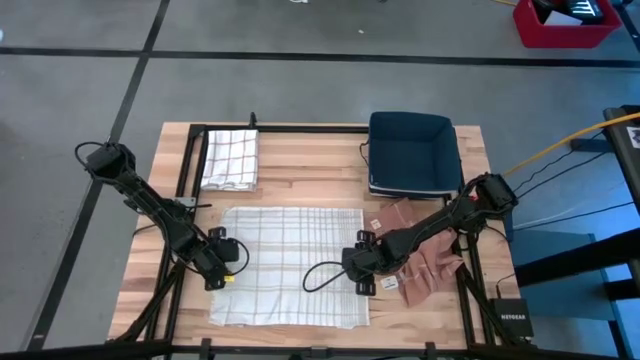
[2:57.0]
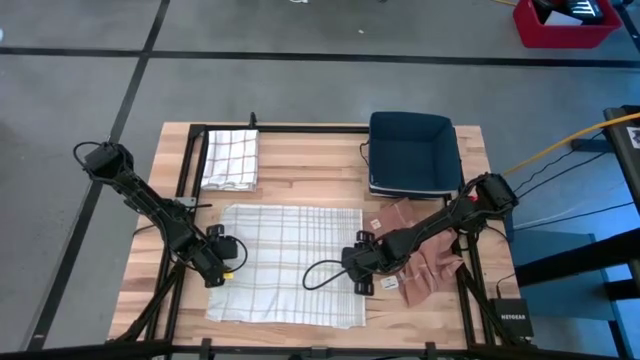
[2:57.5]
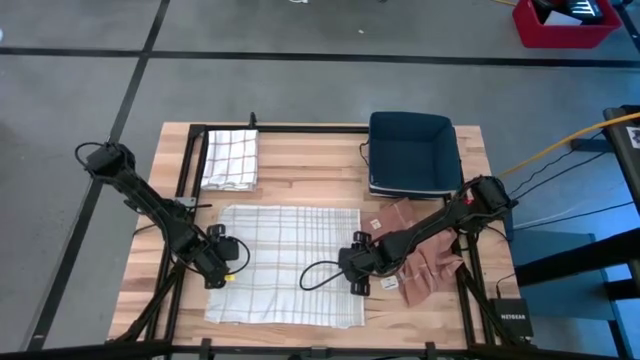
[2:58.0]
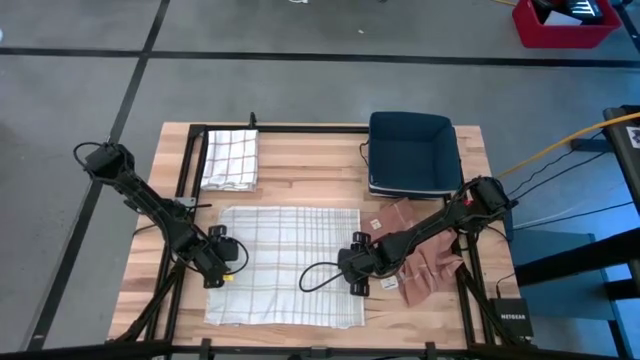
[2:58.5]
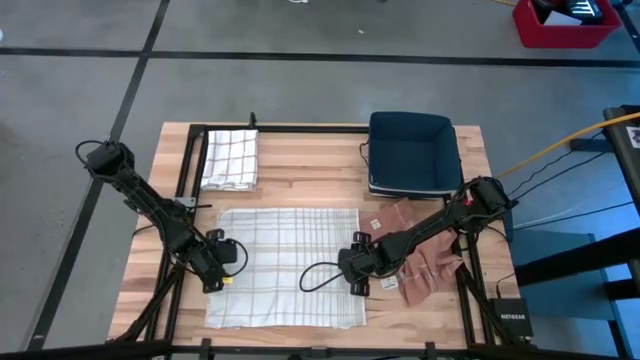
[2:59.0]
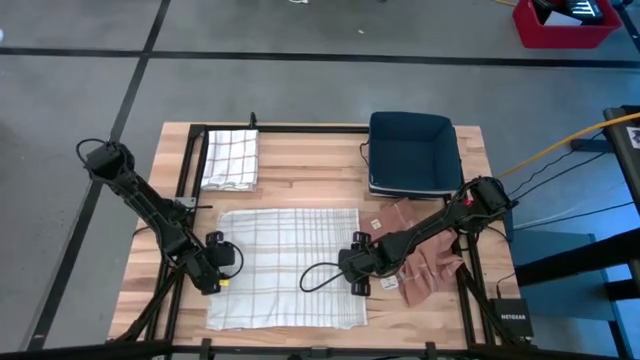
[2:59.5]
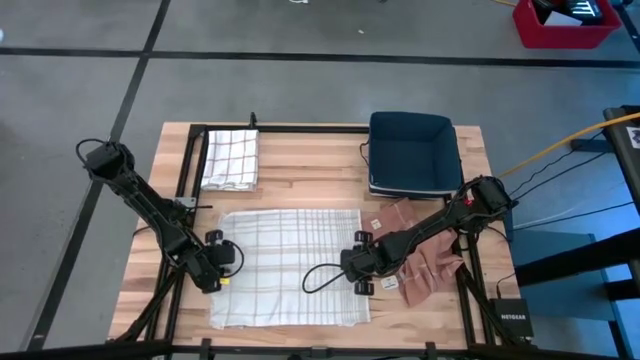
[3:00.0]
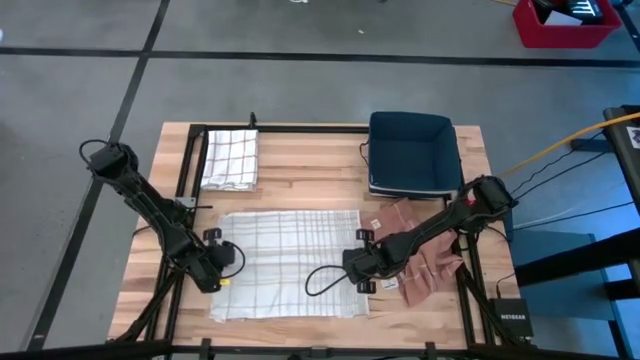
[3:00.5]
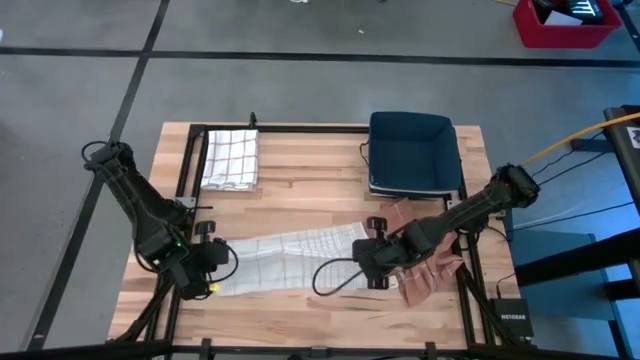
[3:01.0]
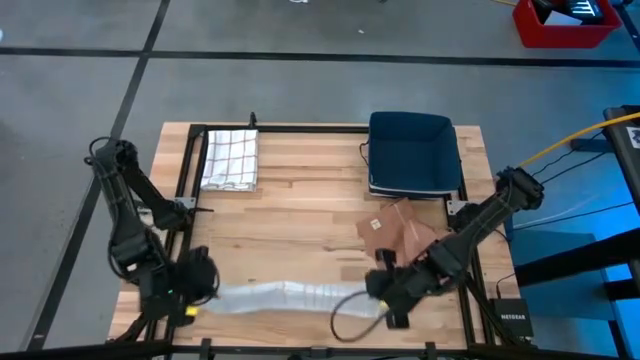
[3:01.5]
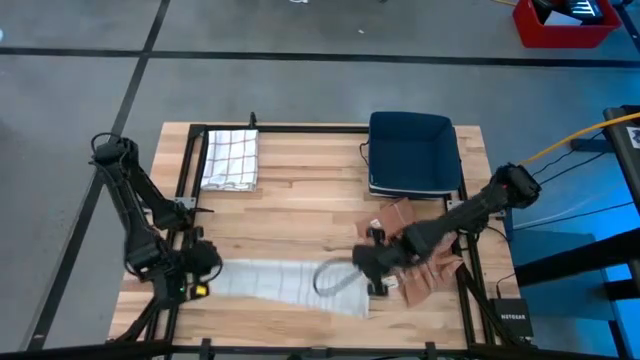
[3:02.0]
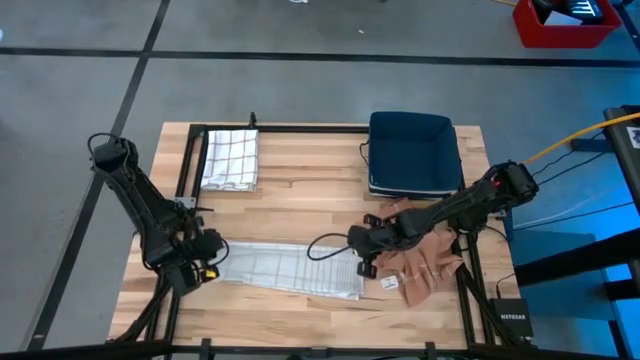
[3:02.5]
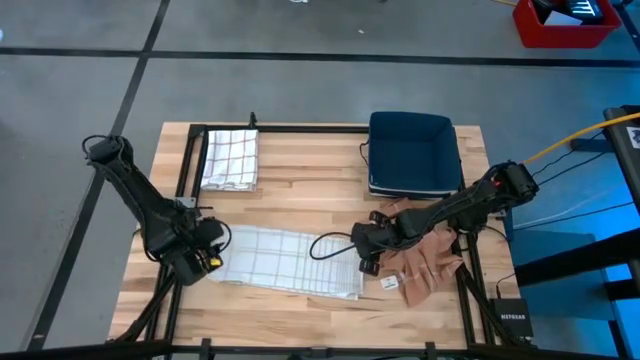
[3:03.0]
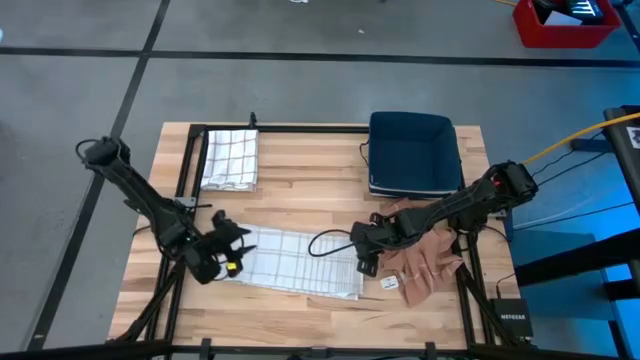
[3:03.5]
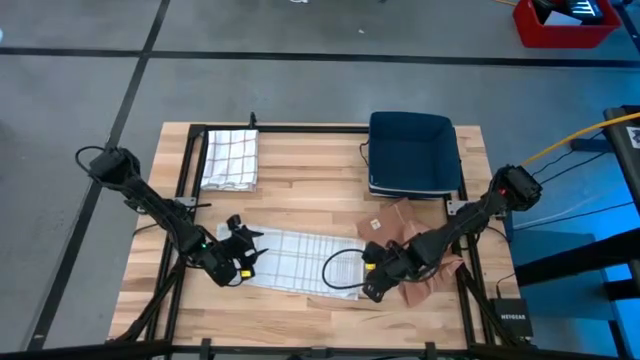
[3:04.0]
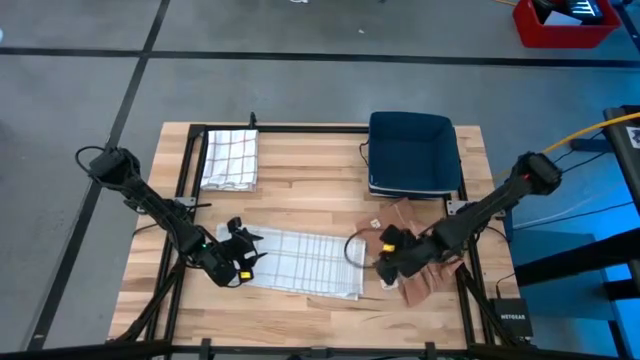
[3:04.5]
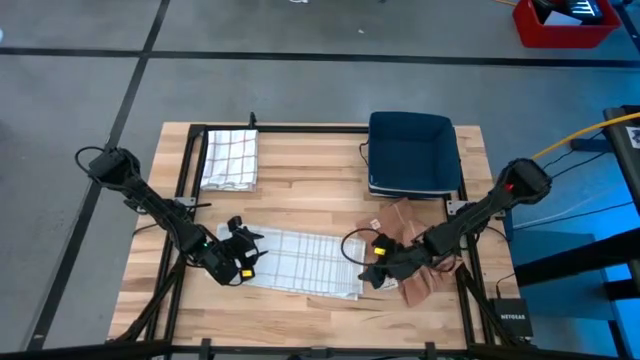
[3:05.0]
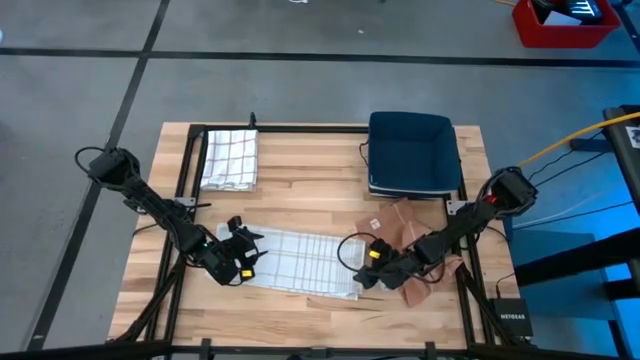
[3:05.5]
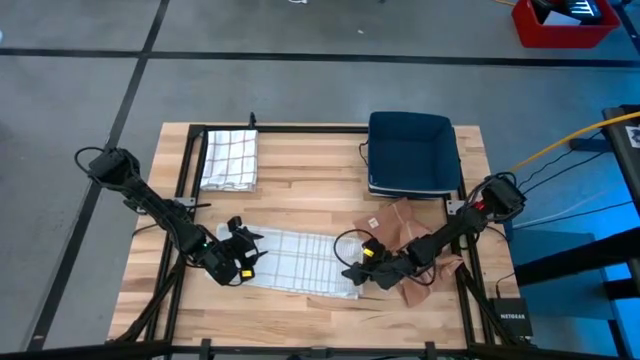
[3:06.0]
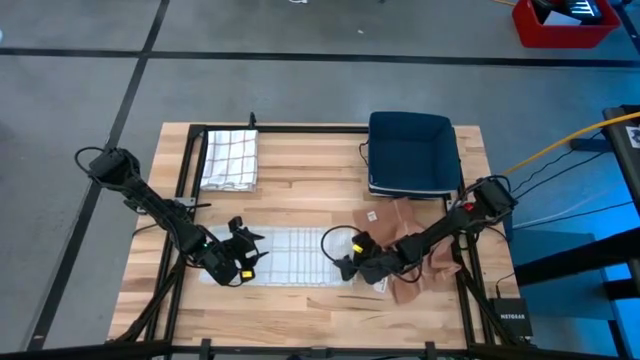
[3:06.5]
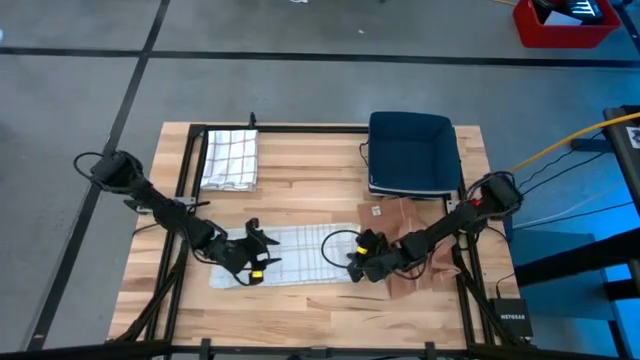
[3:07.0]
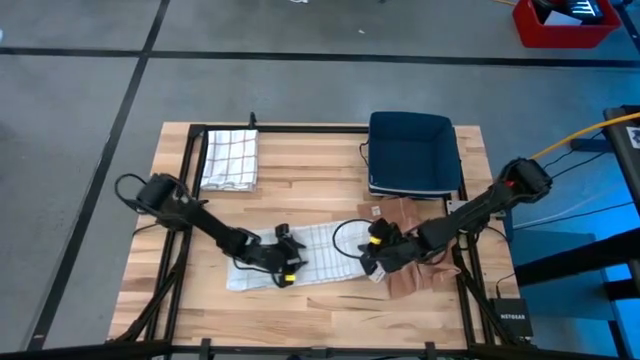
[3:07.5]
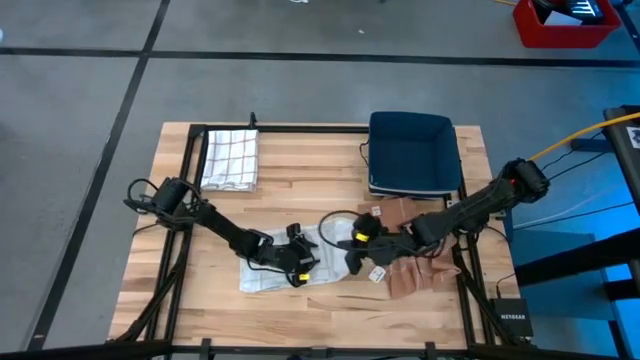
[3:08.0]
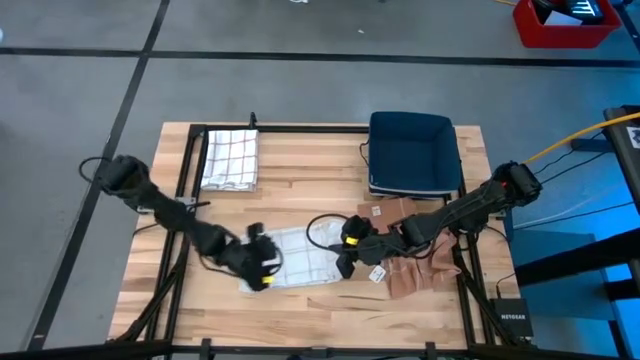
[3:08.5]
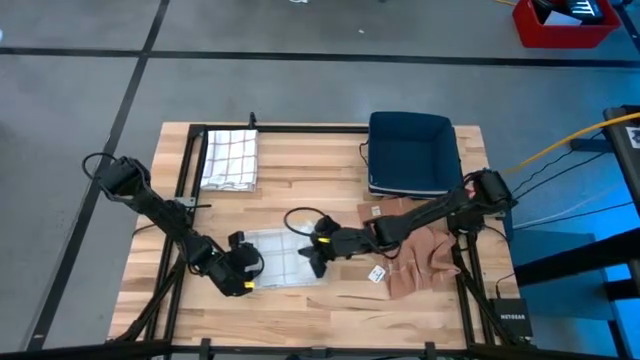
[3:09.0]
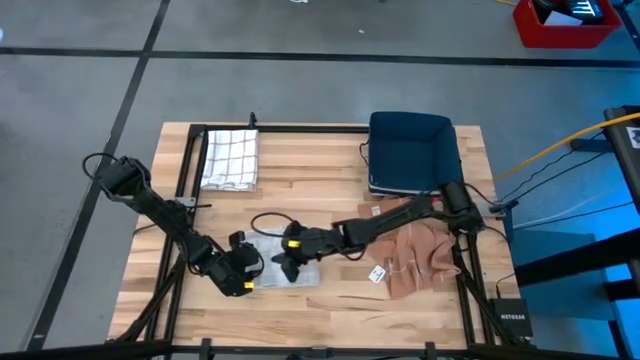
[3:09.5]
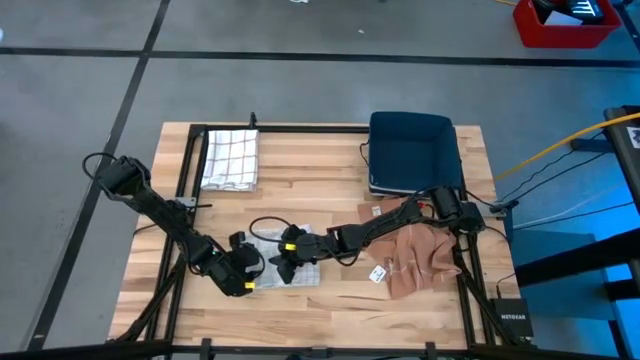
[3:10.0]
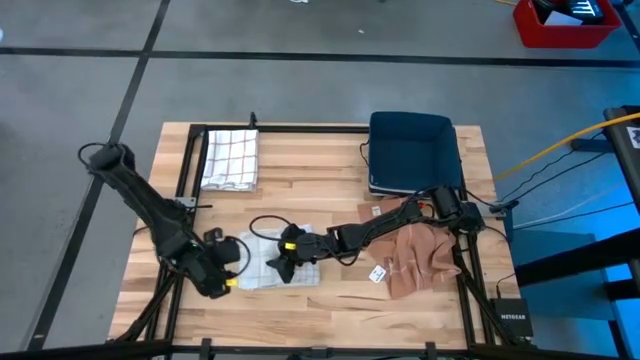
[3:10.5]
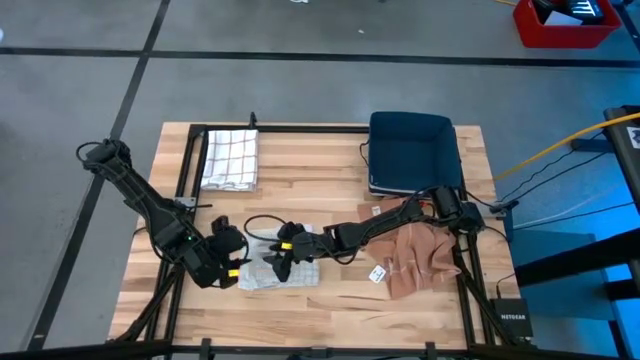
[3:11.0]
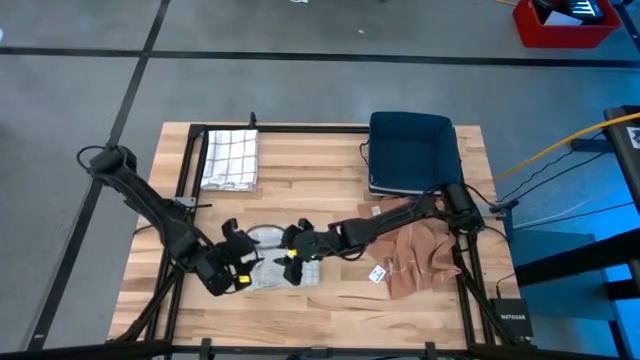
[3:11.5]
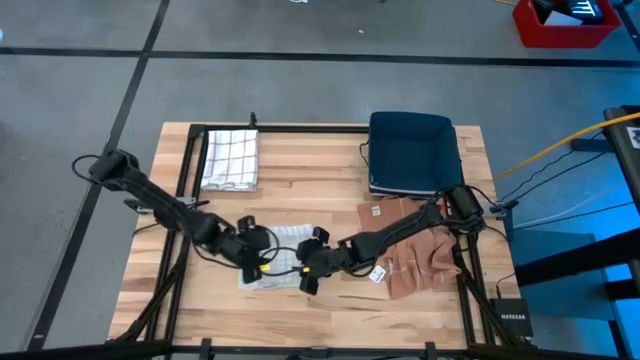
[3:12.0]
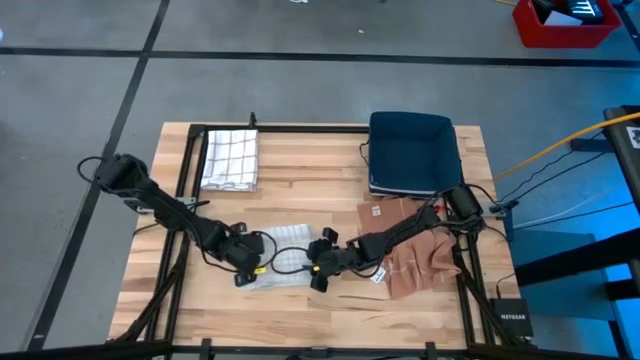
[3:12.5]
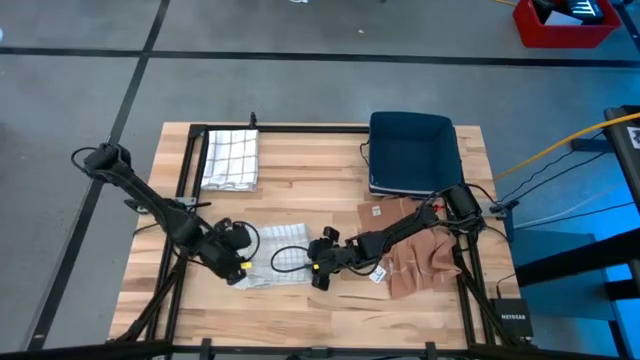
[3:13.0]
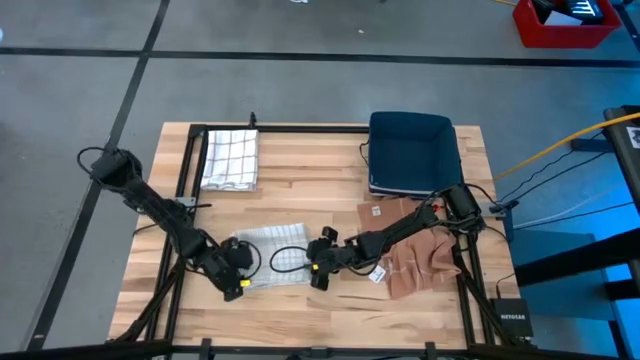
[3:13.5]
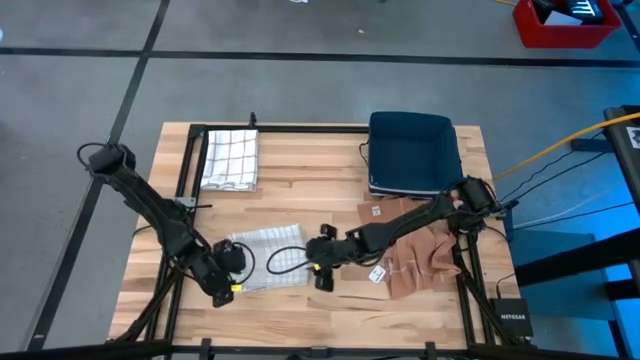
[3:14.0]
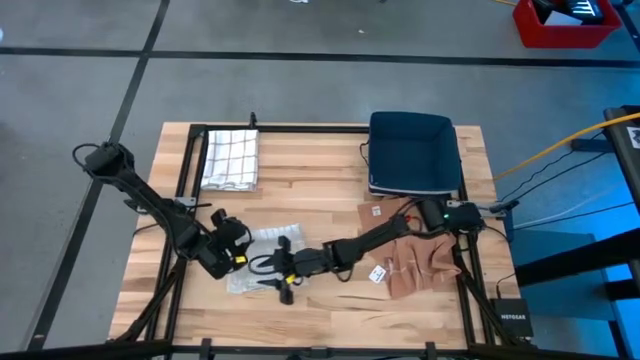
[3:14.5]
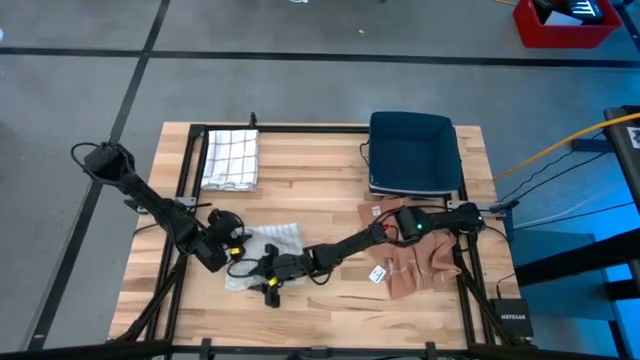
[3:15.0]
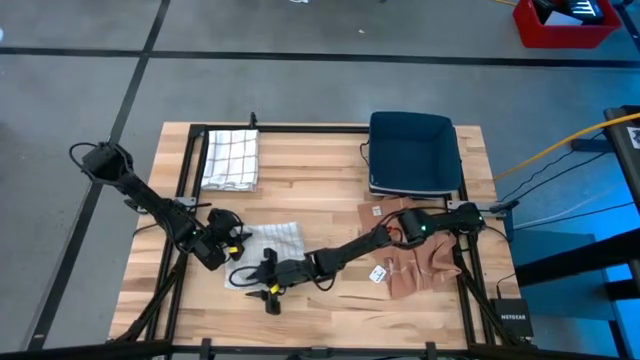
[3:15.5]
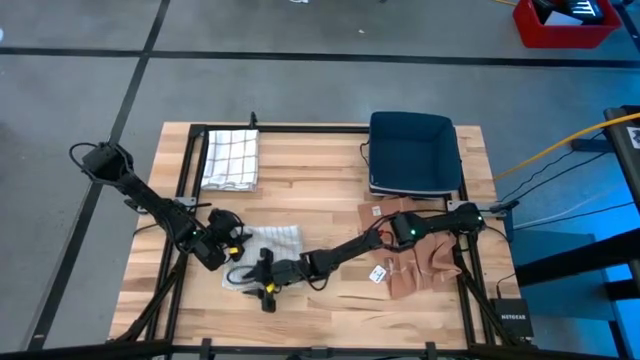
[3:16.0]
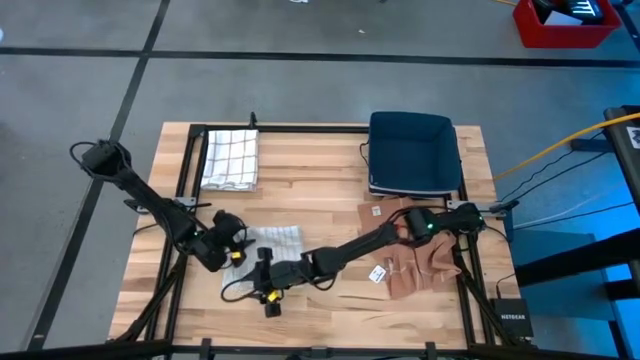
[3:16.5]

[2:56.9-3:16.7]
Task: Fold towel
Fold the white towel on the table
